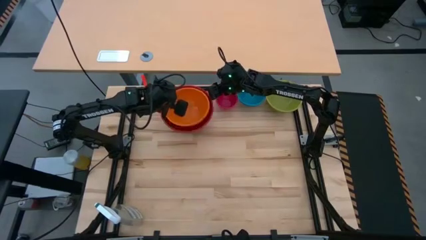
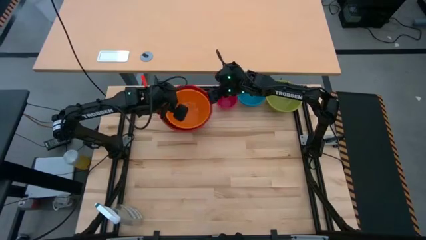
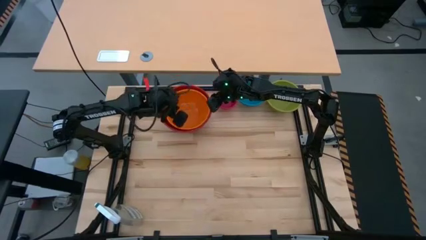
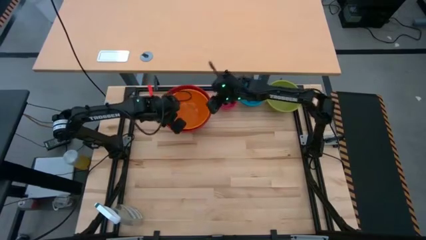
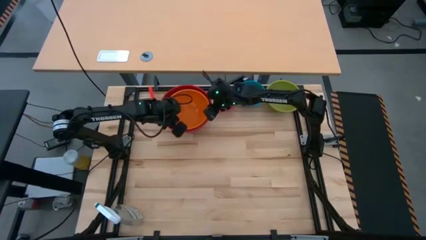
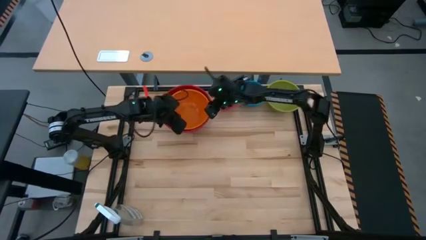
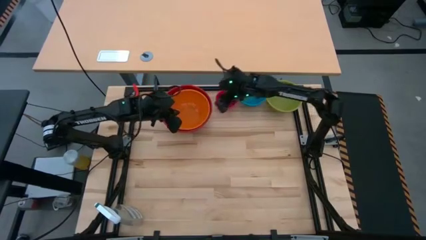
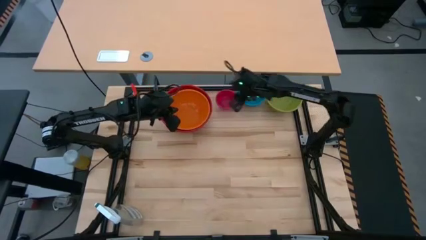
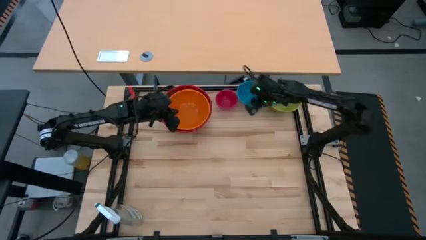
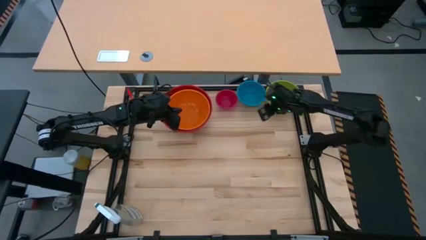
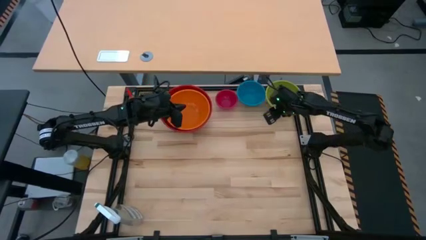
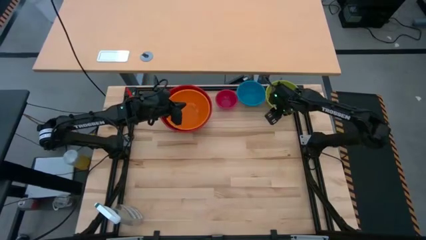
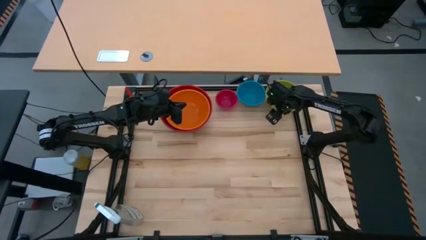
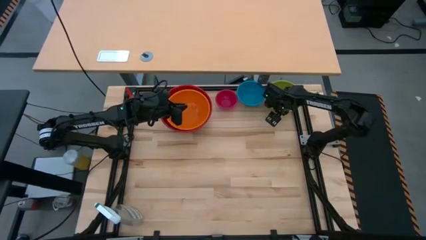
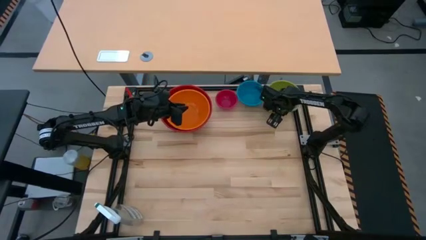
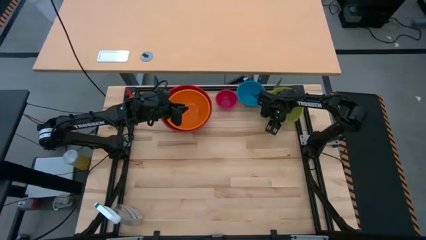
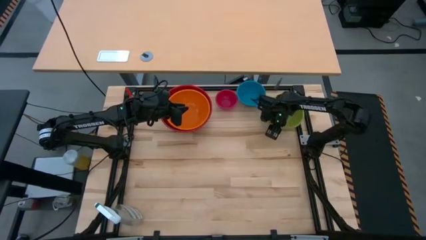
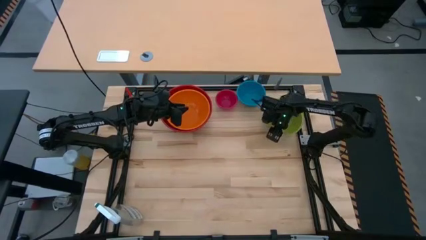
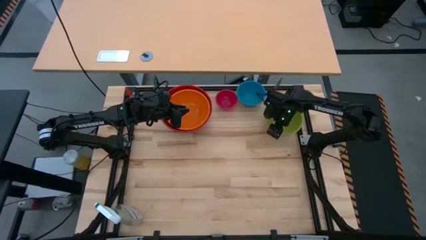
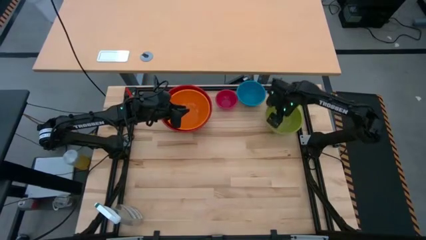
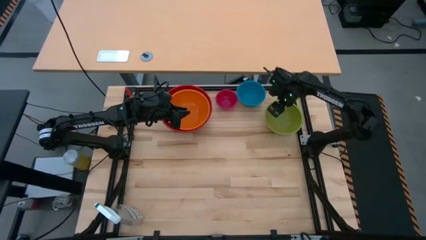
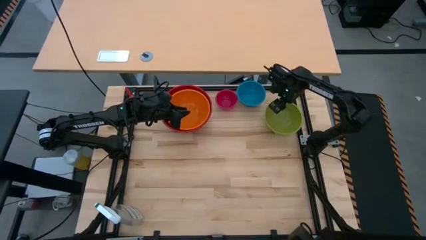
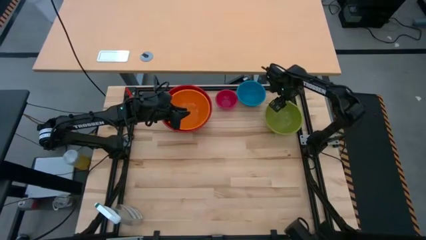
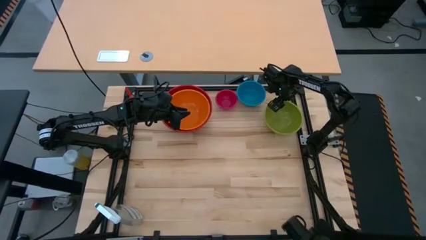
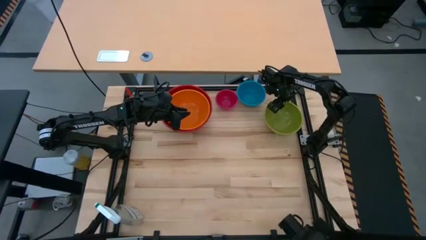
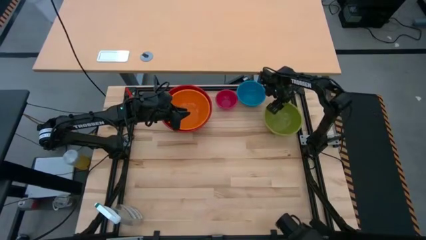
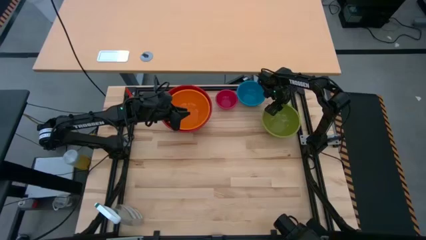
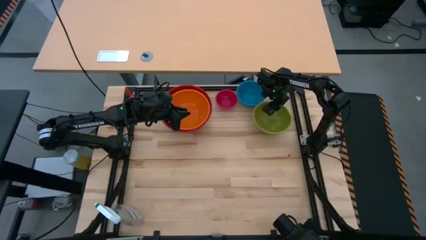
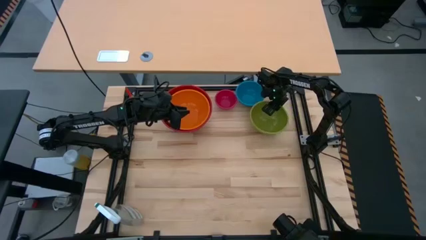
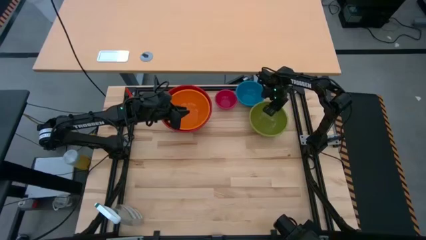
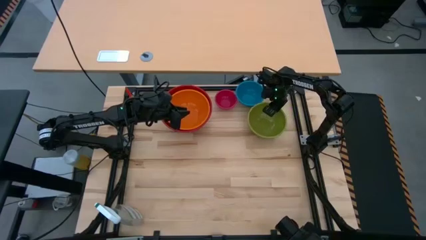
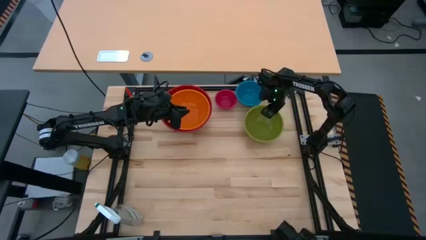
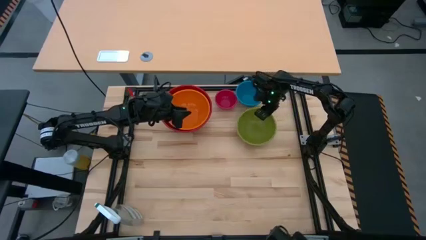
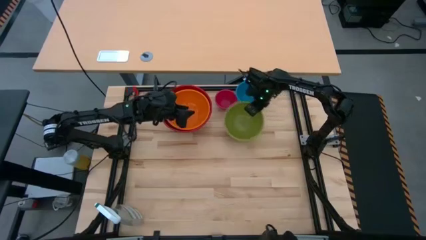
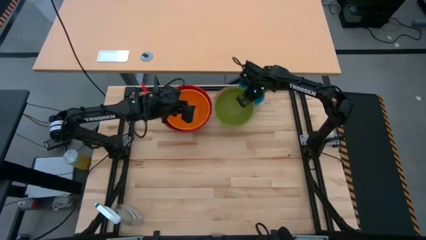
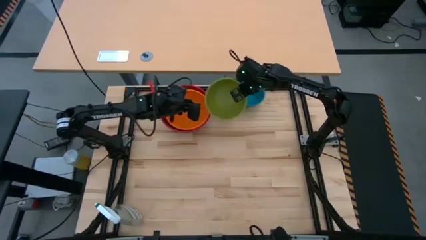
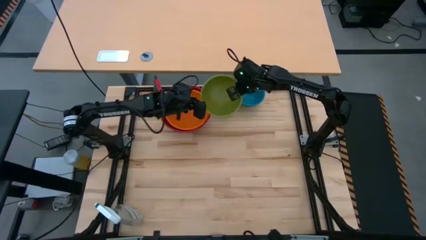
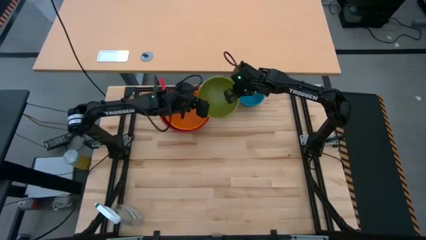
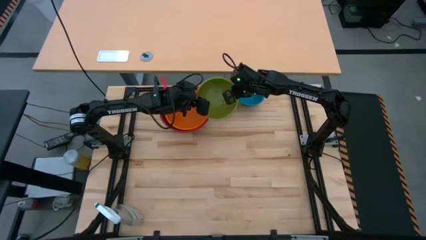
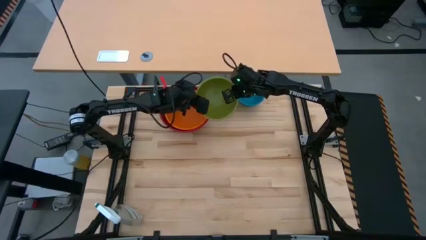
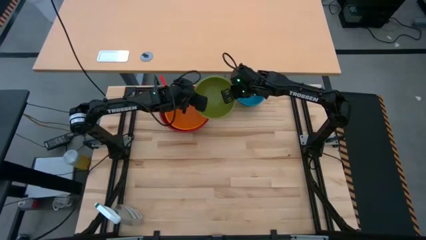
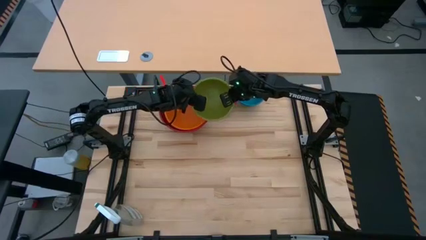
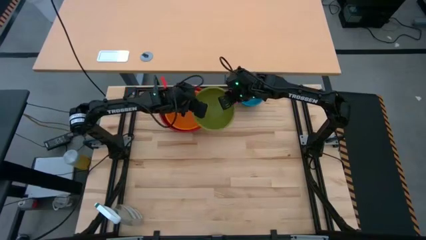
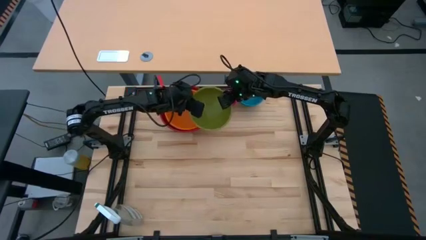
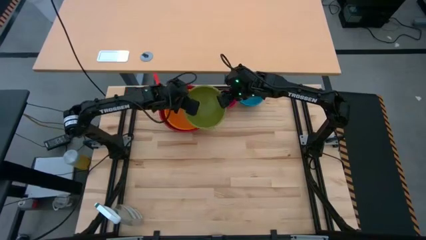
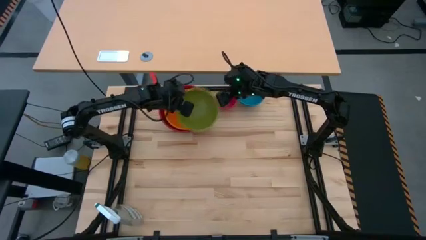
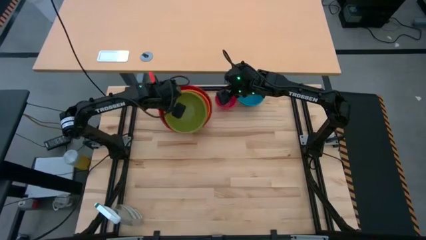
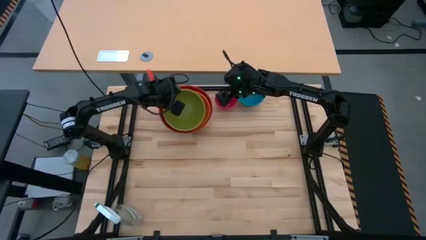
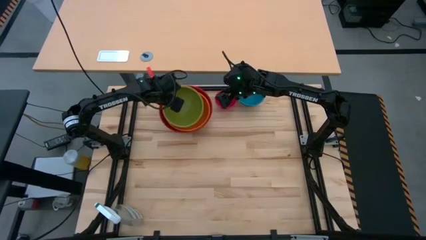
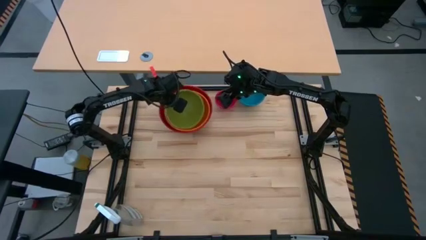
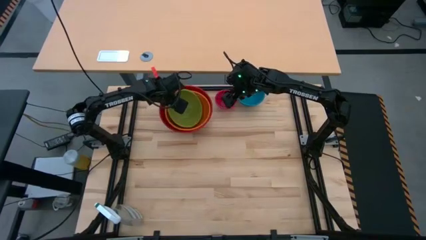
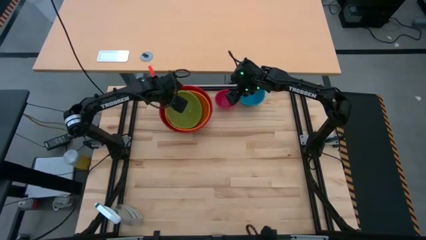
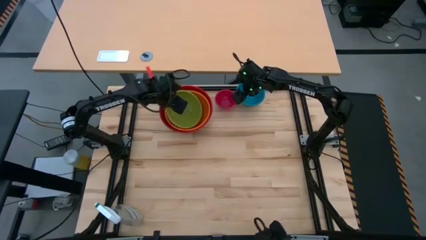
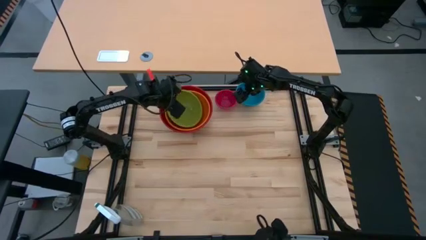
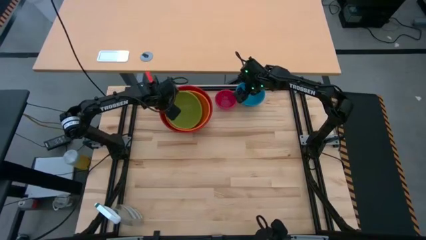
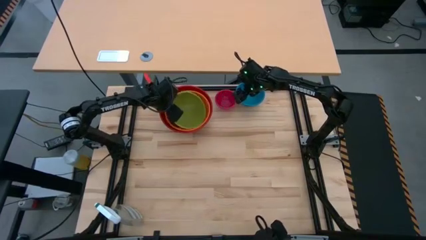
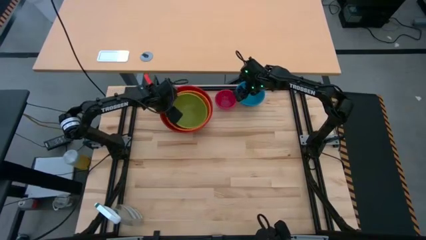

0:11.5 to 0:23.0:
Stack the green bowl on top of the orange bowl

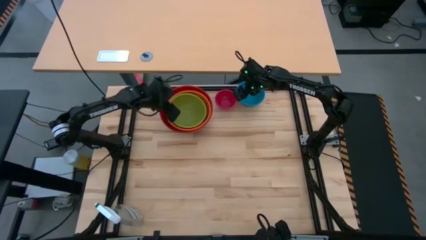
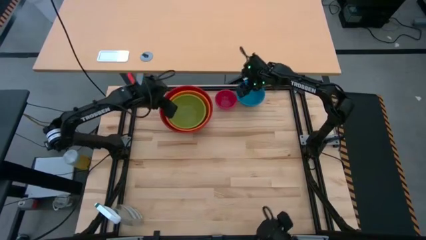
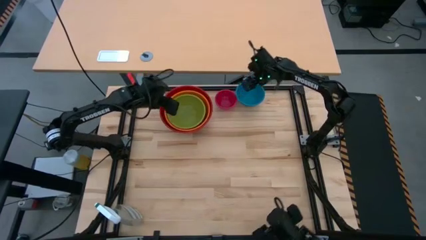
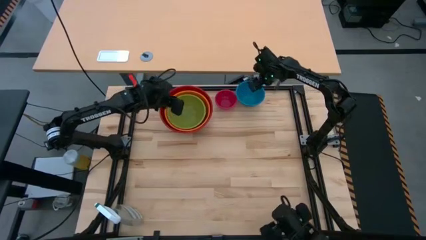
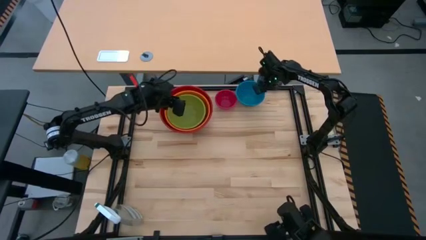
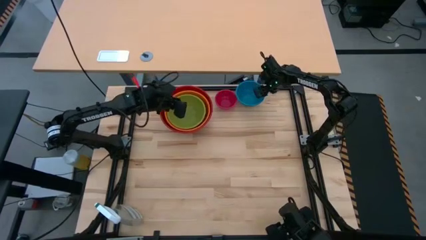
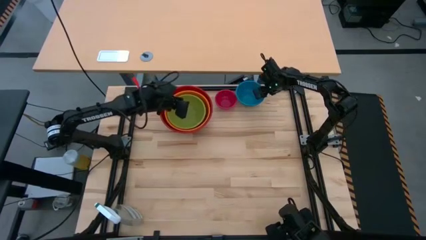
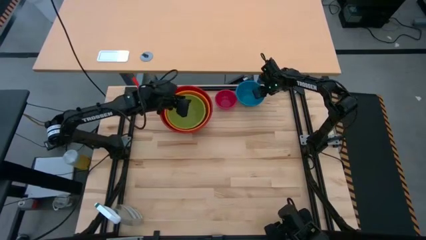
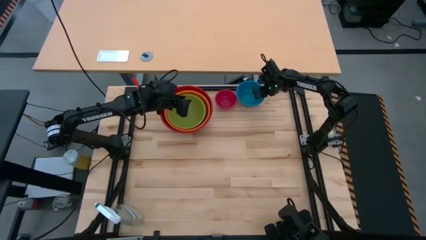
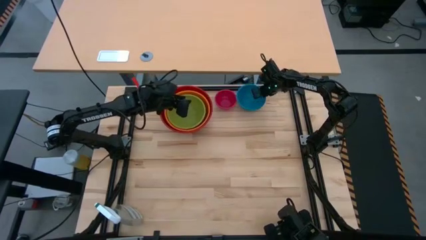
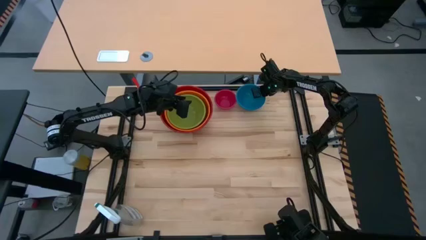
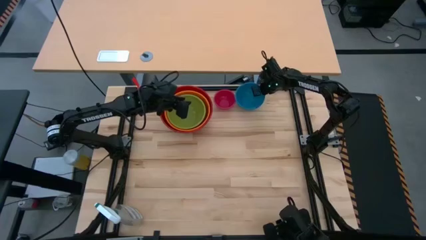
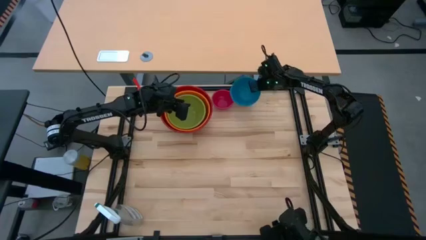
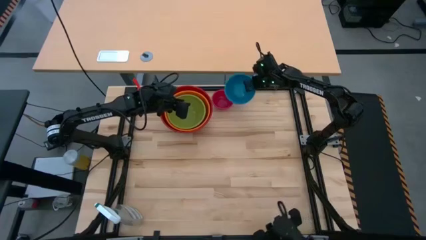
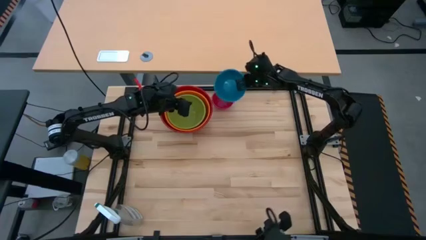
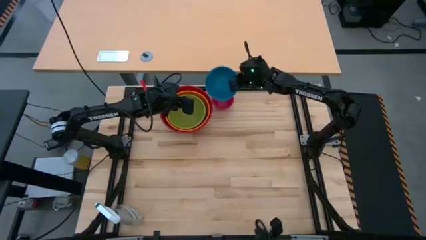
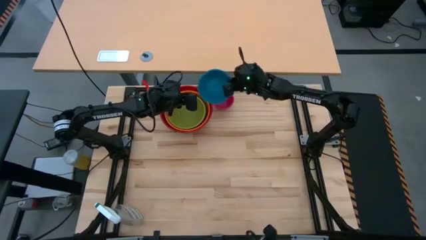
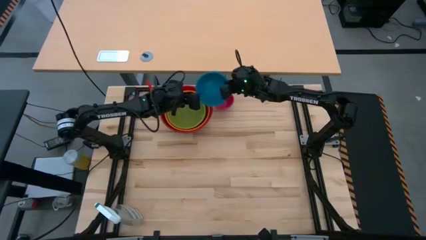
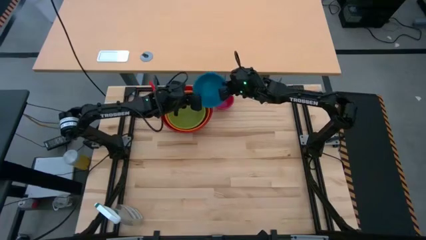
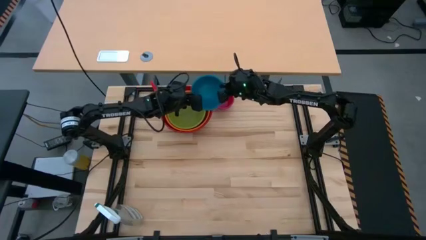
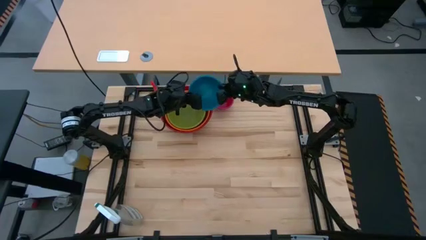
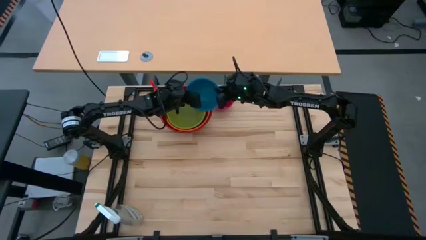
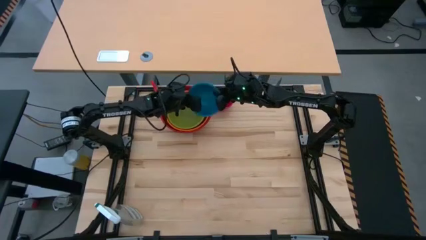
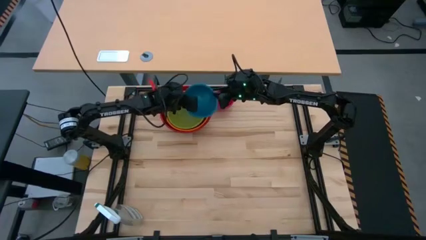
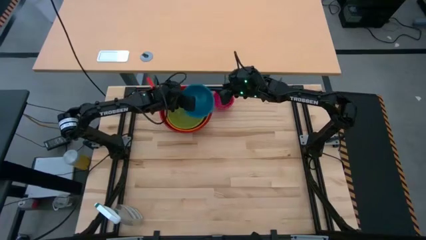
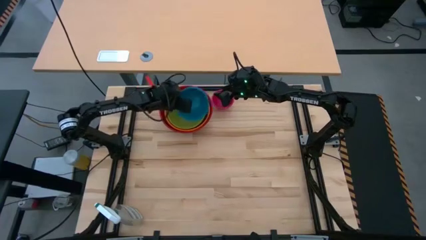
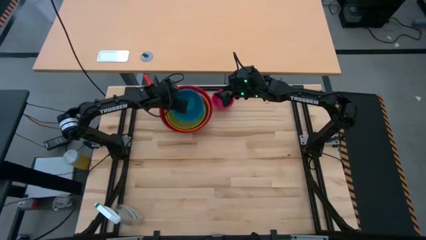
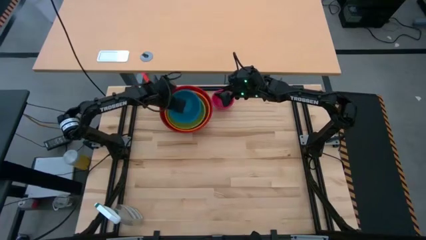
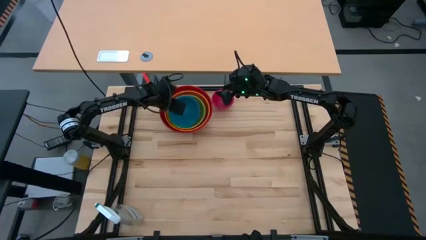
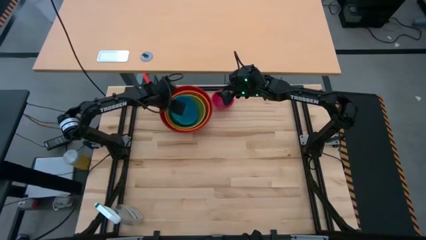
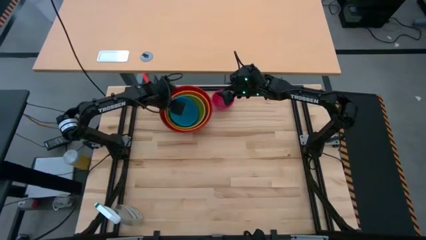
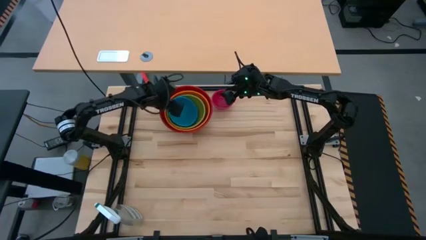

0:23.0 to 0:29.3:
Stack the blue bowl on top of the green bowl
